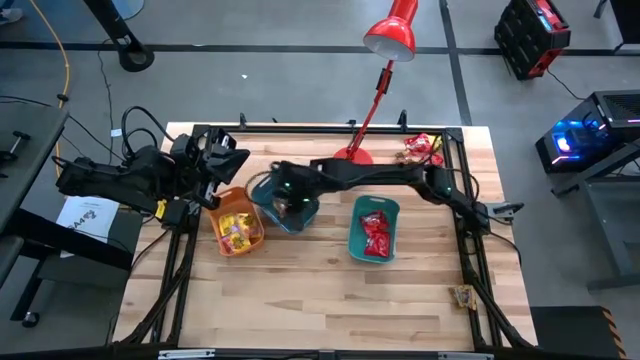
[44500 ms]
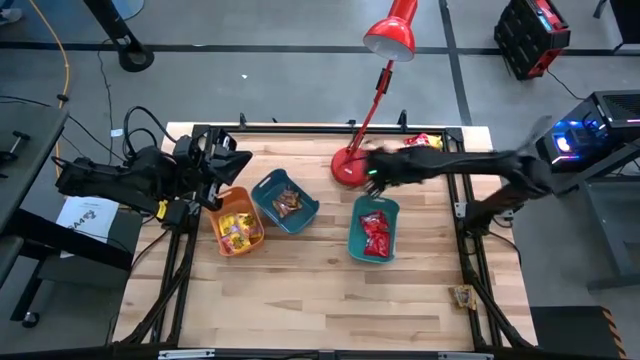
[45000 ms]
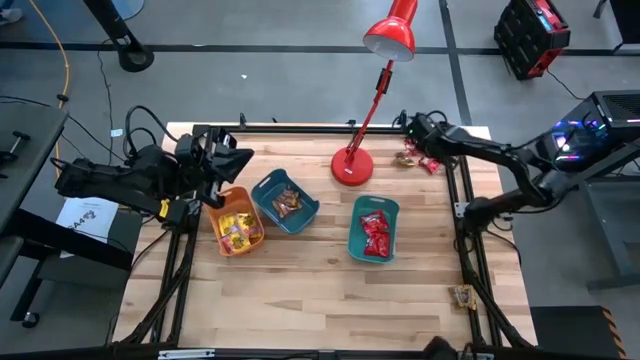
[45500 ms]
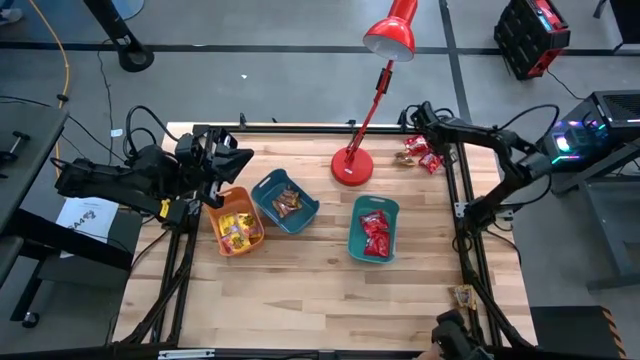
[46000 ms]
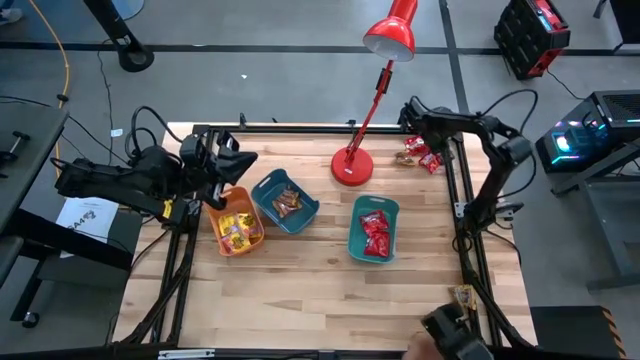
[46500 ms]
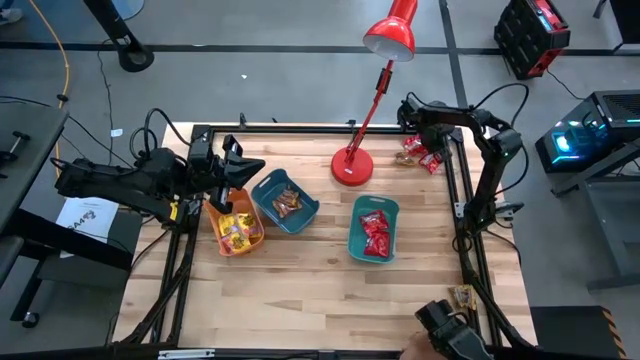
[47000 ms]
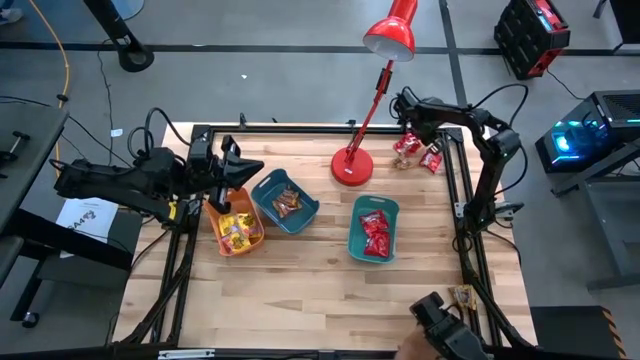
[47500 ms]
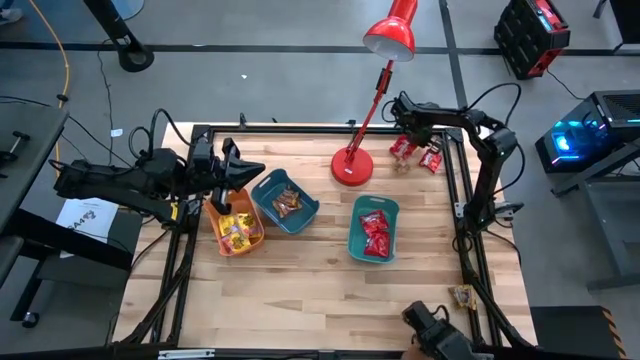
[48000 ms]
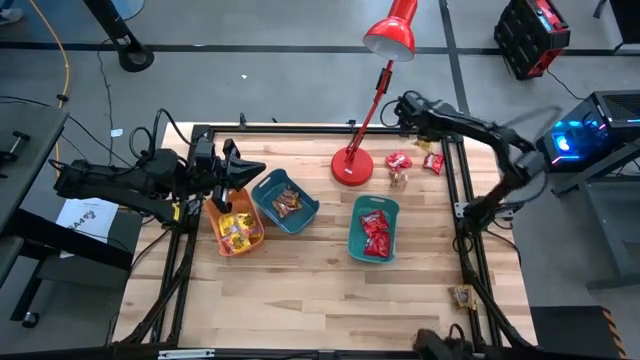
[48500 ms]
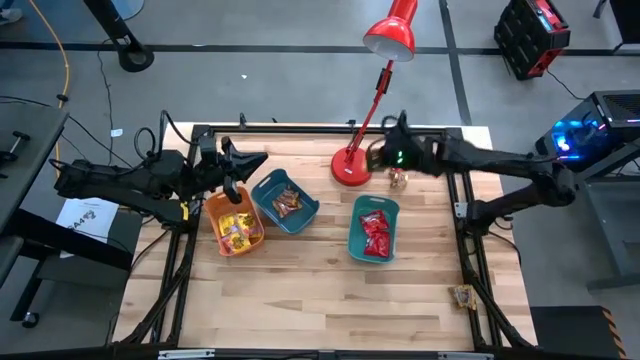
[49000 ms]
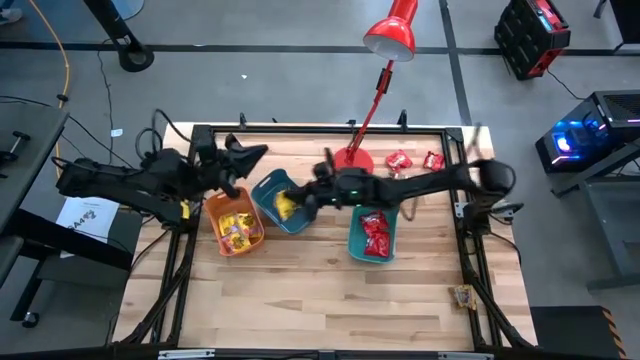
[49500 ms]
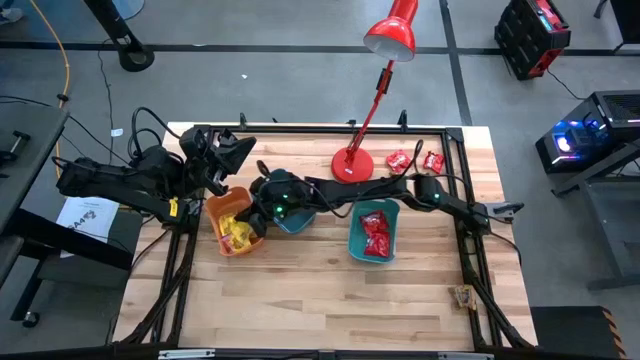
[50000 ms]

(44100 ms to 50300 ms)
Task: Sort candy
Put the top right yellow candy into the orange bin

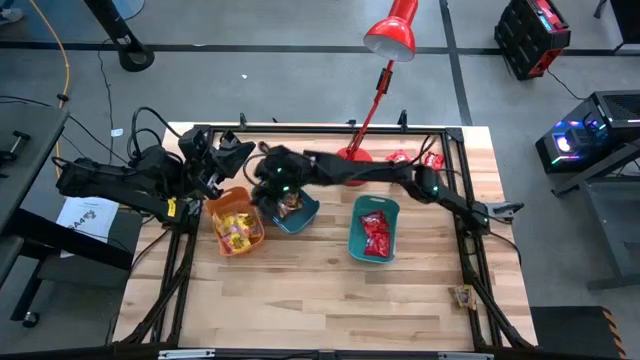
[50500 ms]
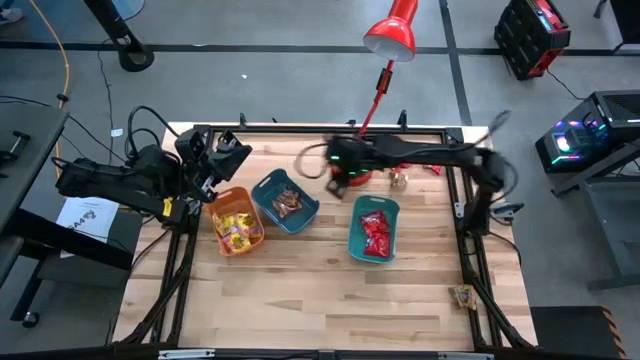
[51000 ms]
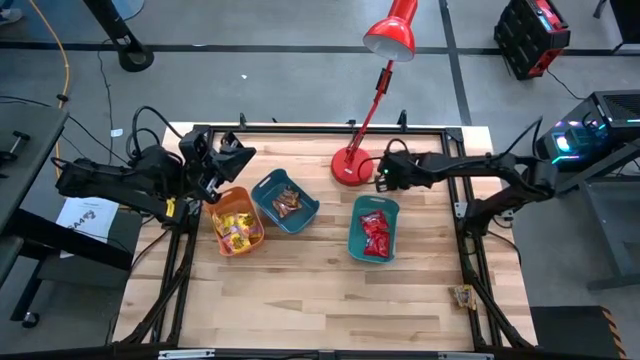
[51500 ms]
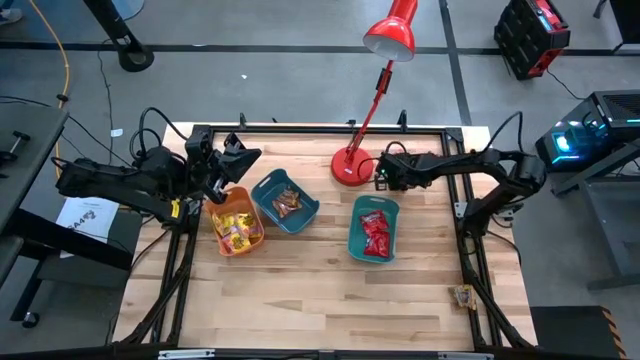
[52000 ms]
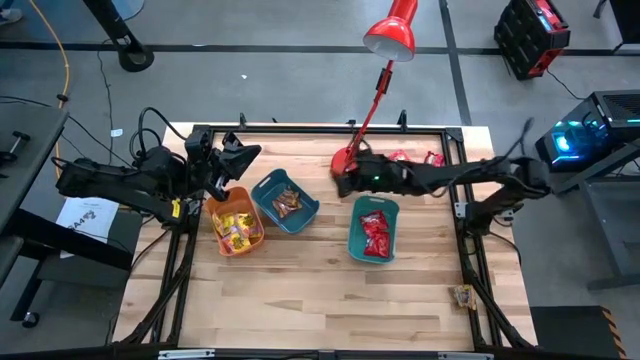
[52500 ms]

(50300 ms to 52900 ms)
Put the top gold candy into the blue bin

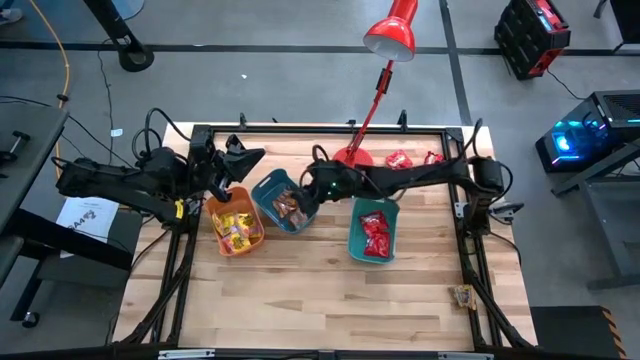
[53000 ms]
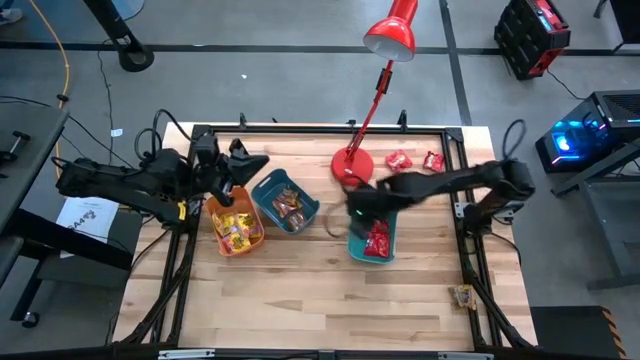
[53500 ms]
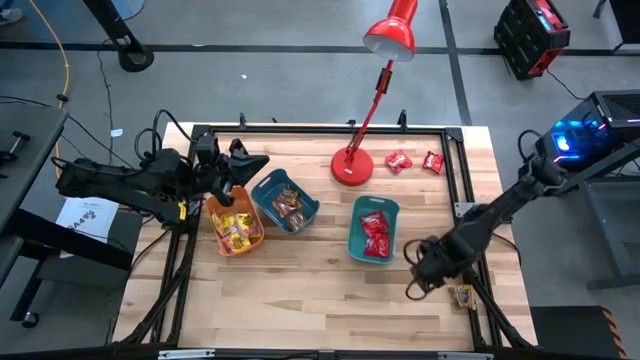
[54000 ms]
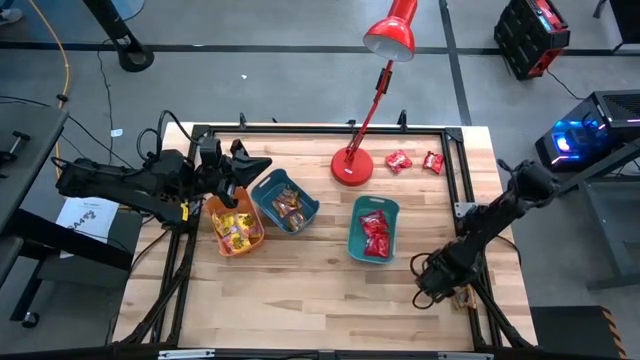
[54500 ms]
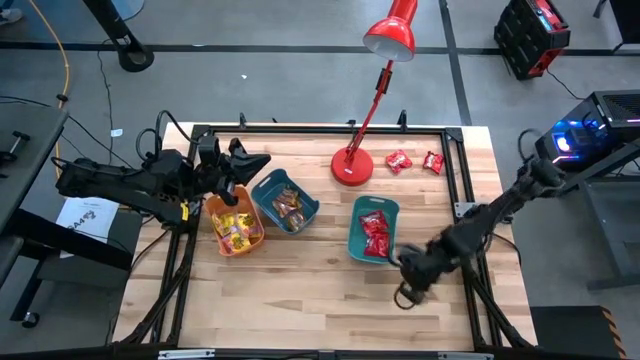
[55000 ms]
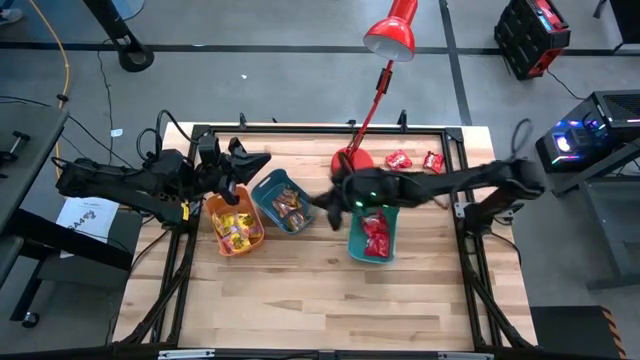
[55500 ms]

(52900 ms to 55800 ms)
Put the gold candy into the blue bin

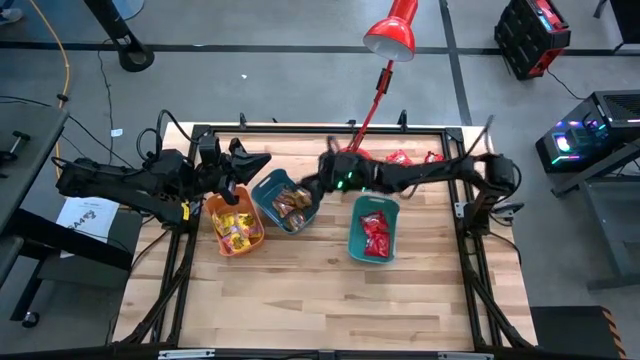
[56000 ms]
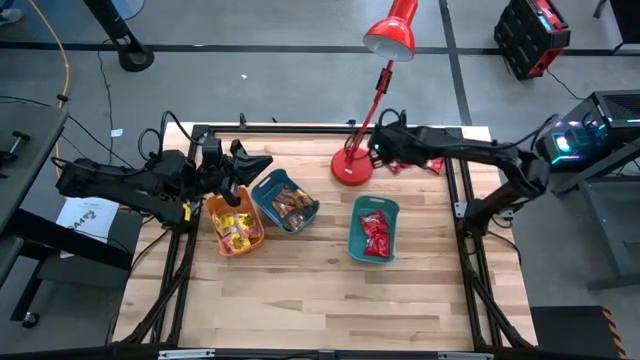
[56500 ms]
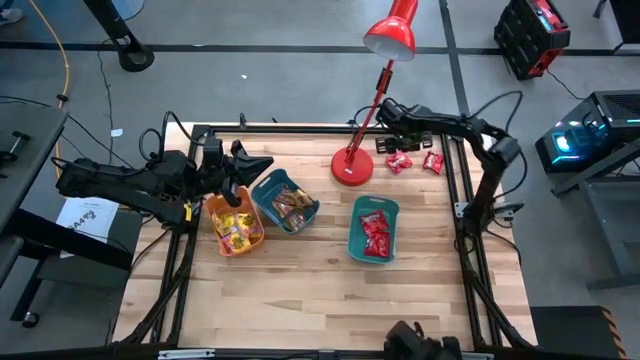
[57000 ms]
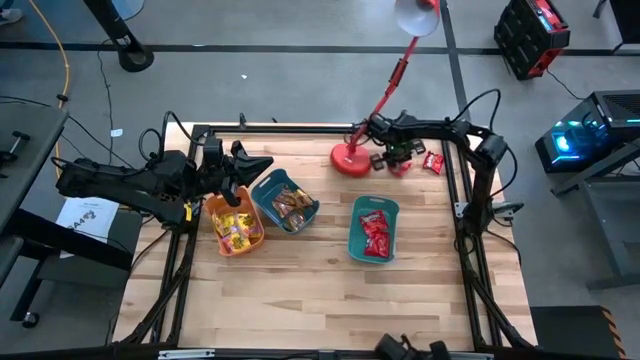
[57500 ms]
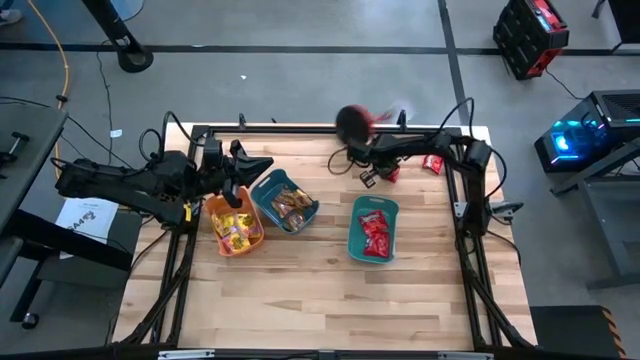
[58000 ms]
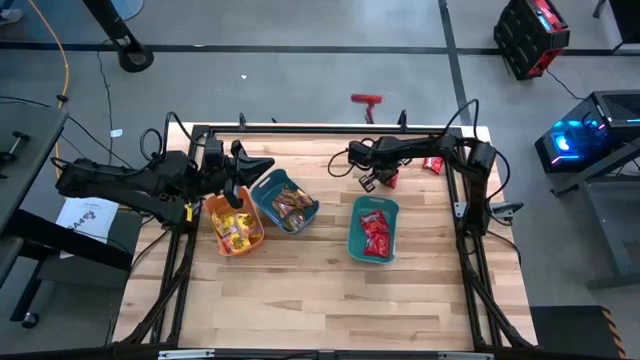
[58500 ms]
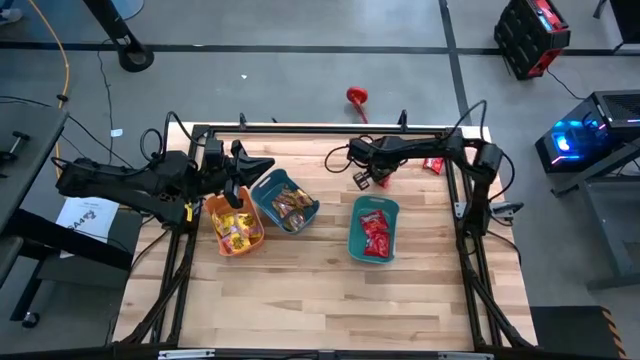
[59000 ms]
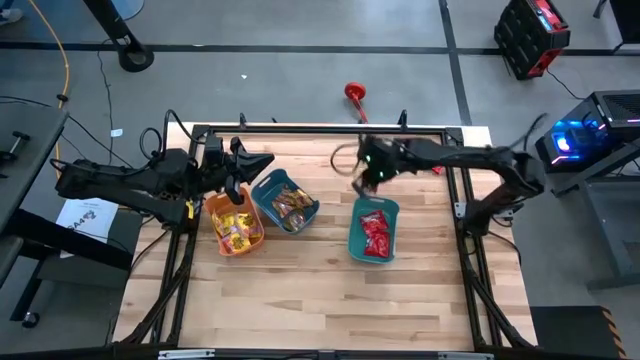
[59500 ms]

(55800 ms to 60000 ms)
Put the left red candy into the light blue bin

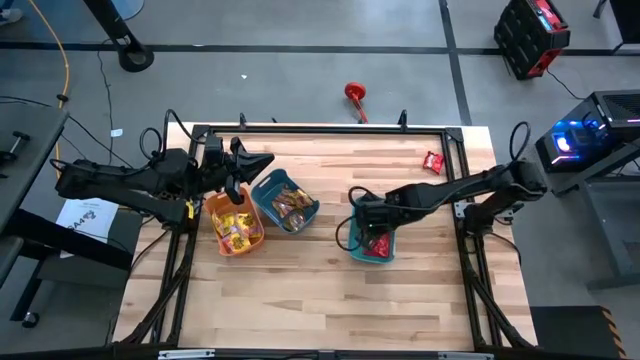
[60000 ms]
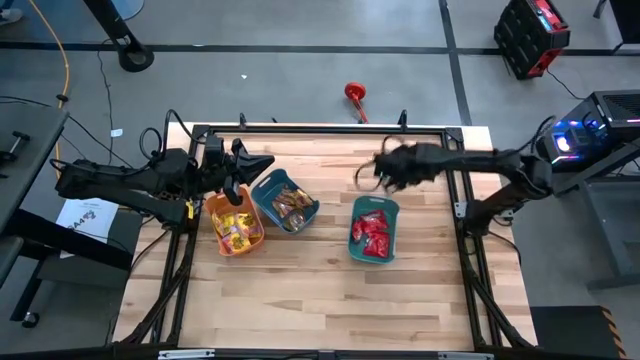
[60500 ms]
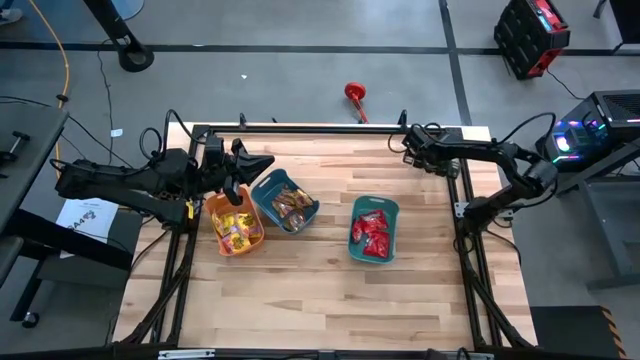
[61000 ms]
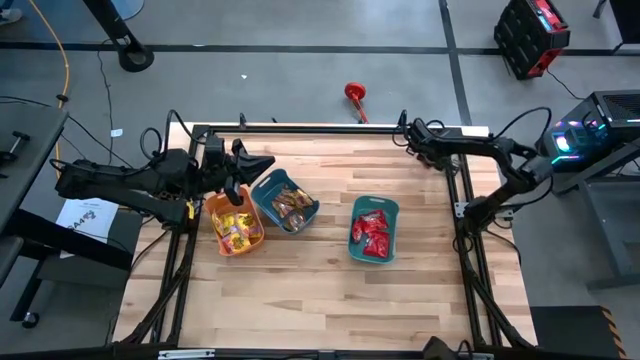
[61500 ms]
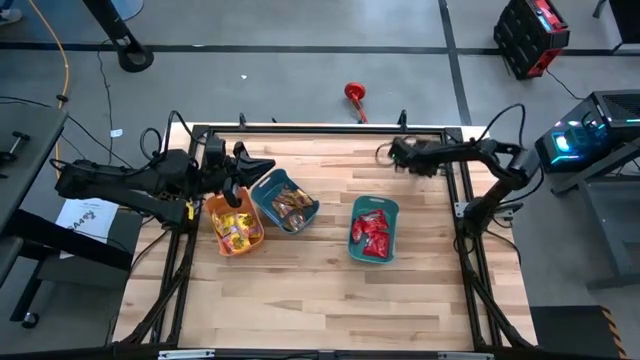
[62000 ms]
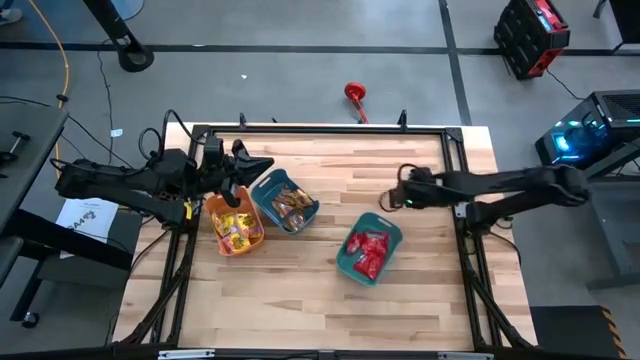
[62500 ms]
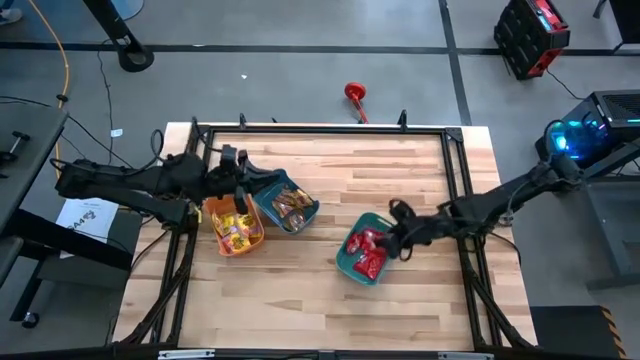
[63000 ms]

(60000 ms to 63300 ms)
Put the red candy into the light blue bin

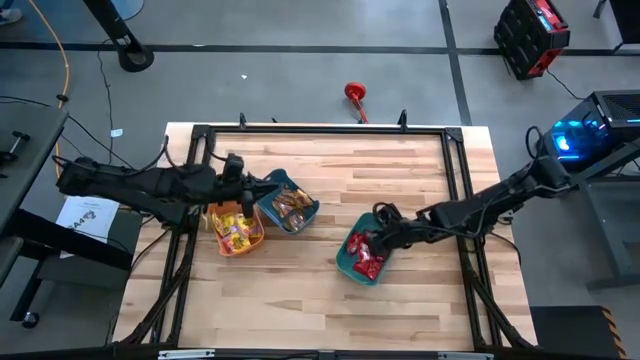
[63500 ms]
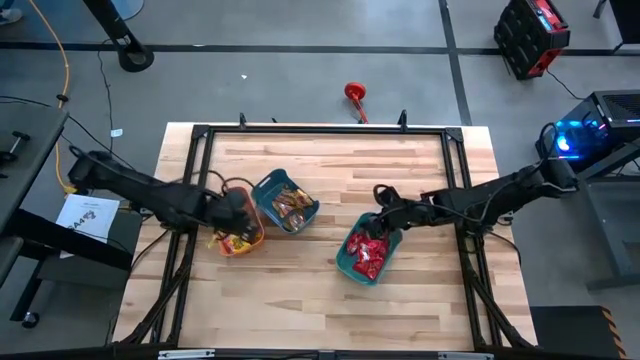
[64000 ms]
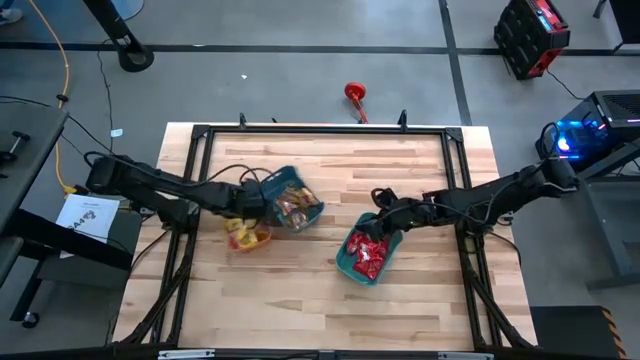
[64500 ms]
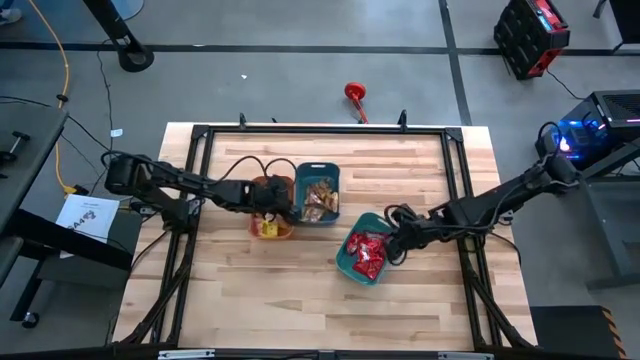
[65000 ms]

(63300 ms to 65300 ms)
Adjust the bins
